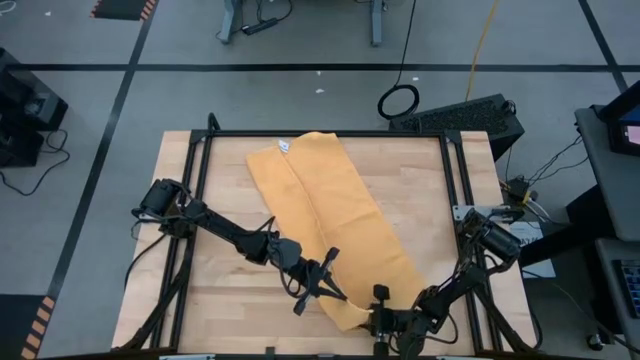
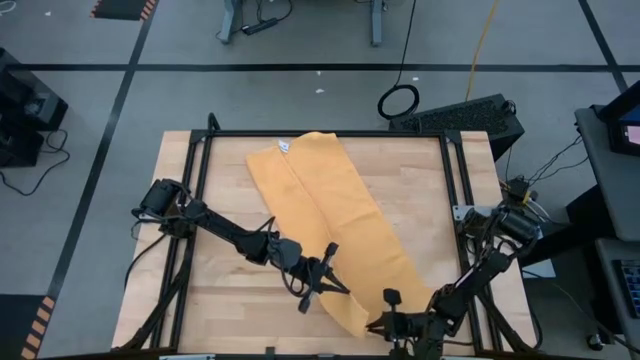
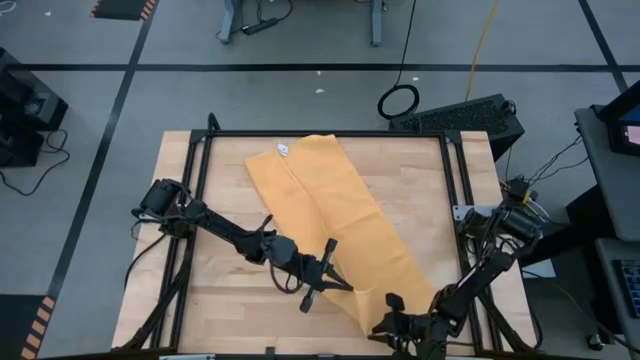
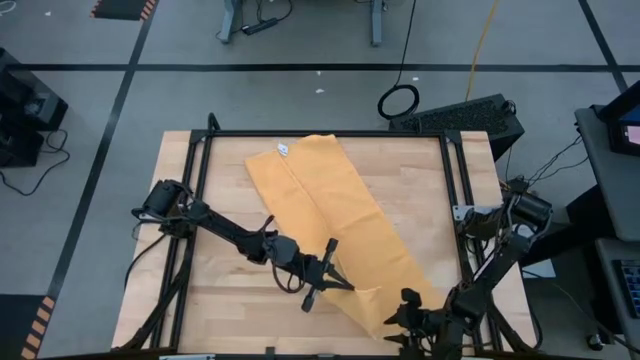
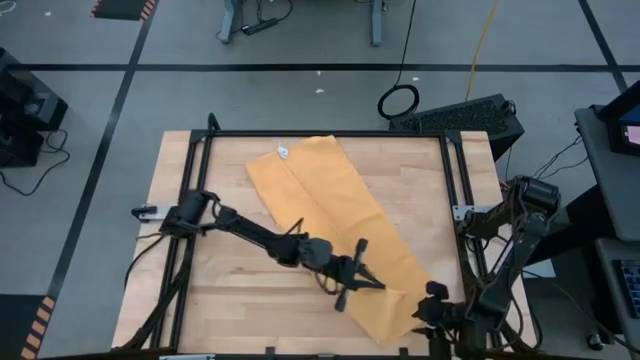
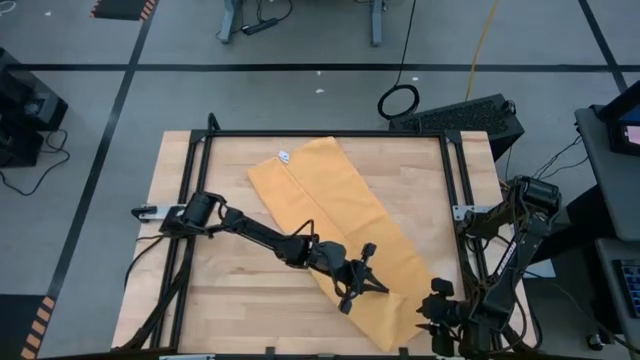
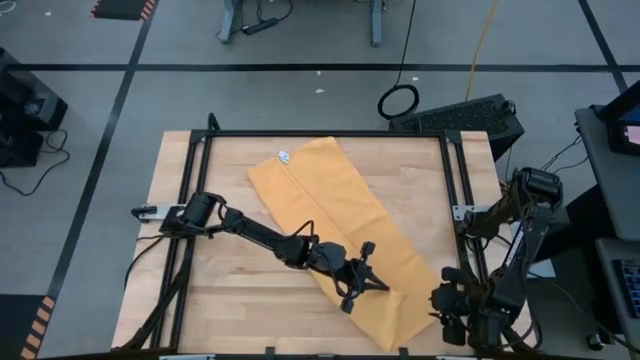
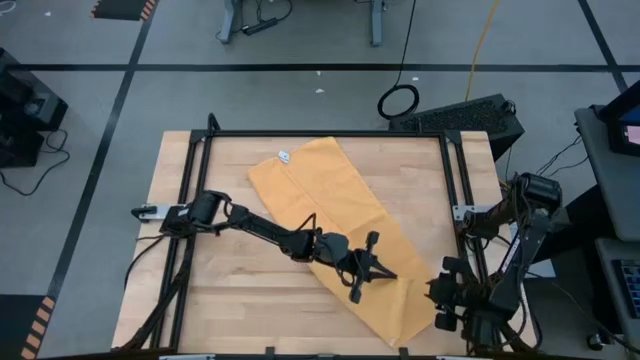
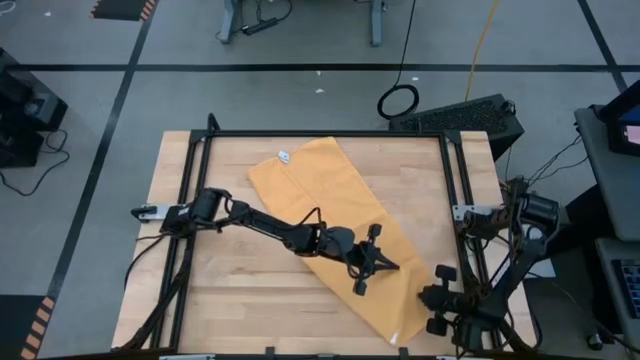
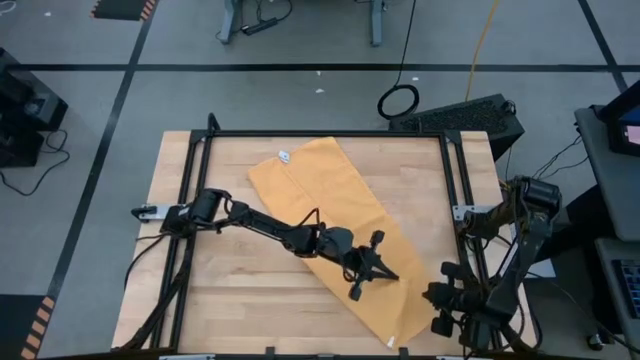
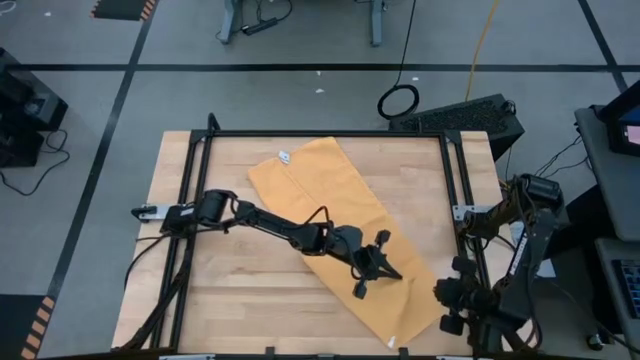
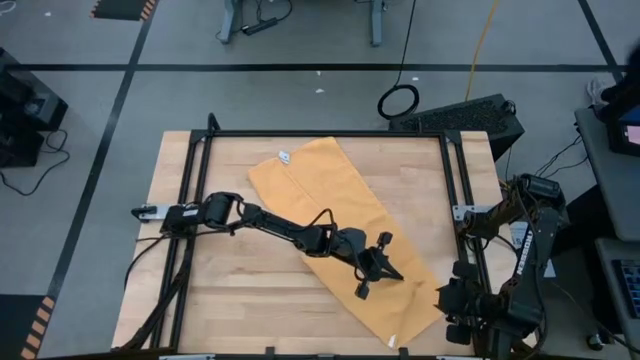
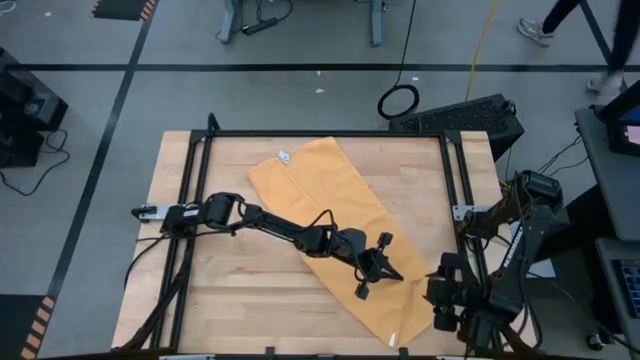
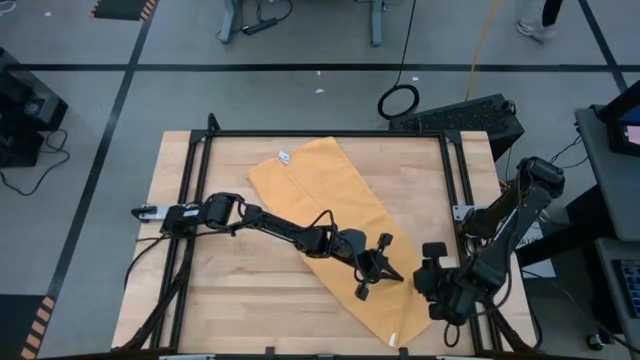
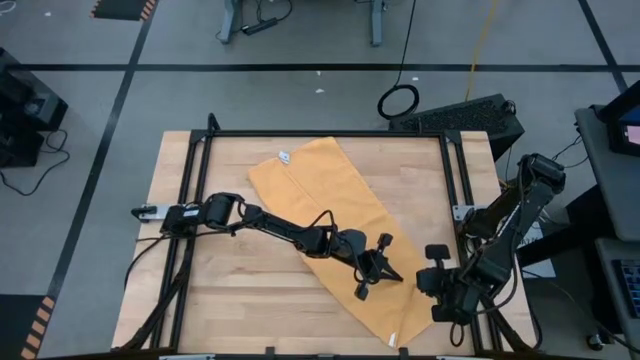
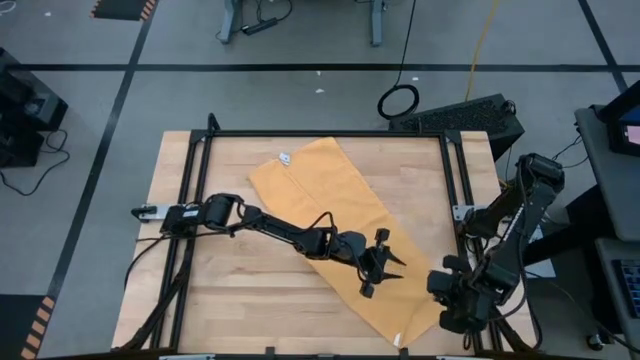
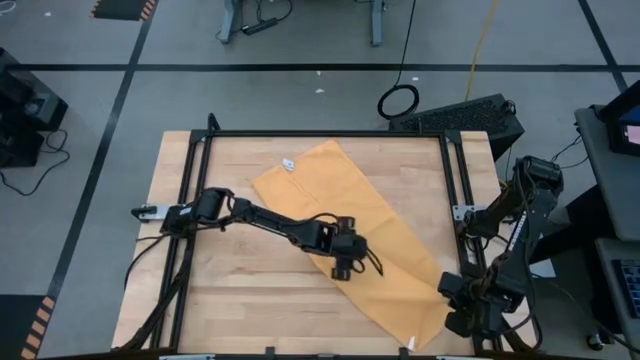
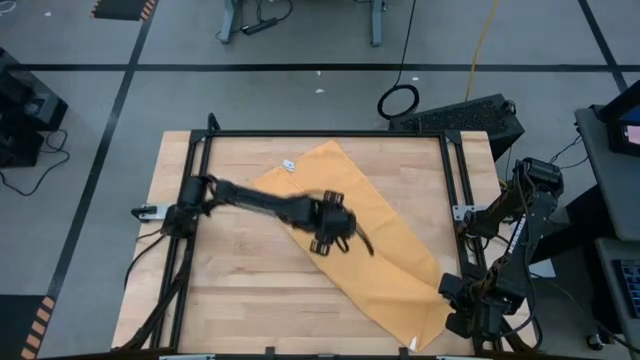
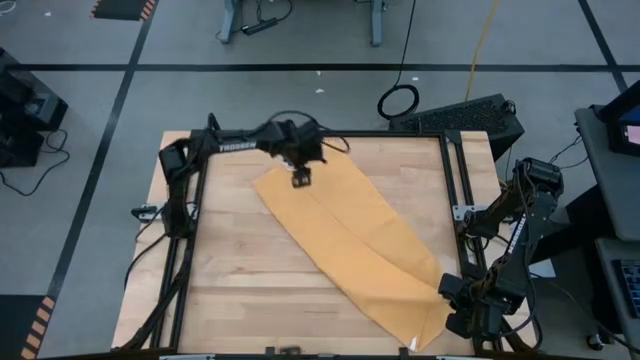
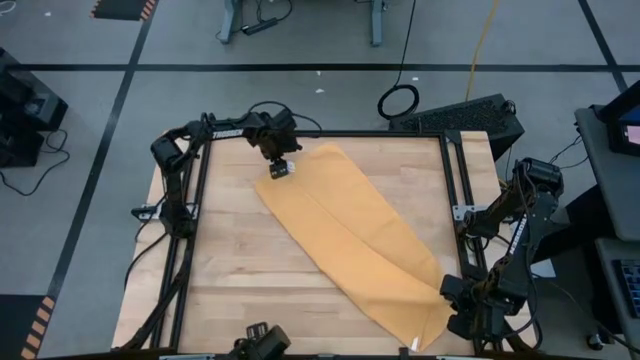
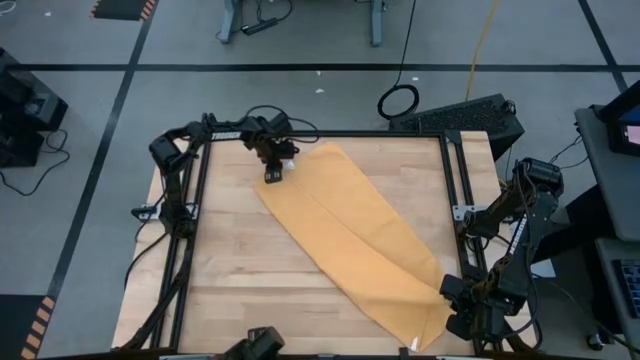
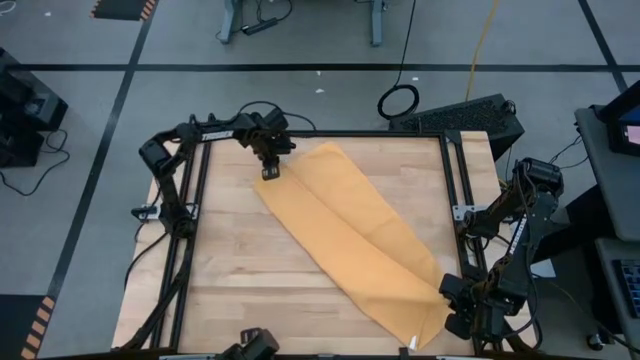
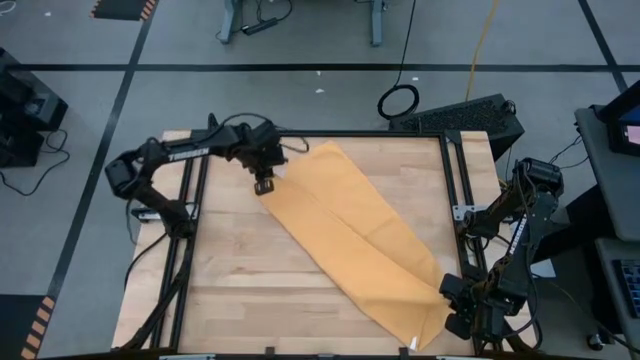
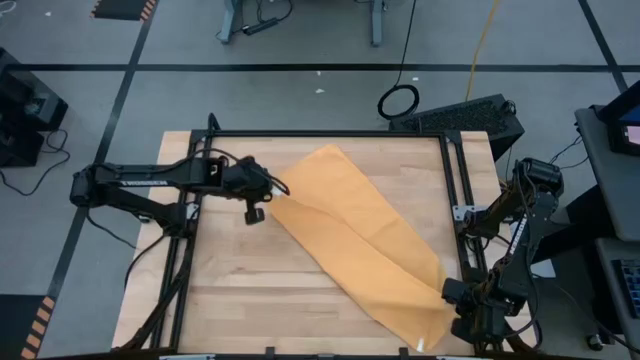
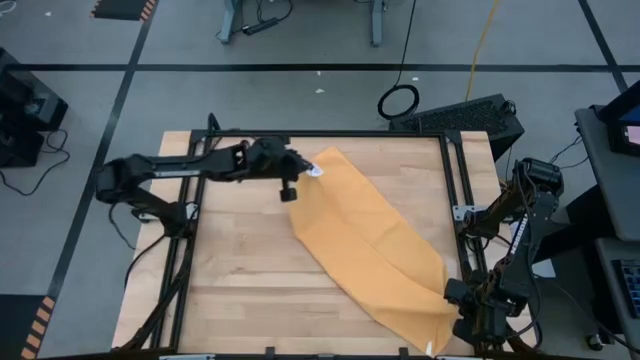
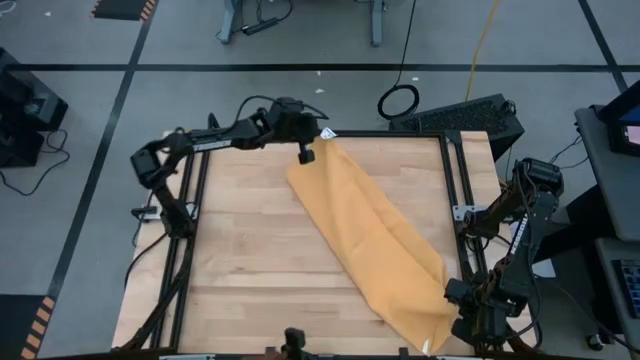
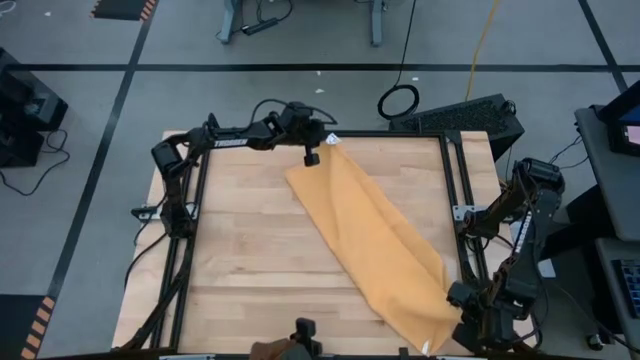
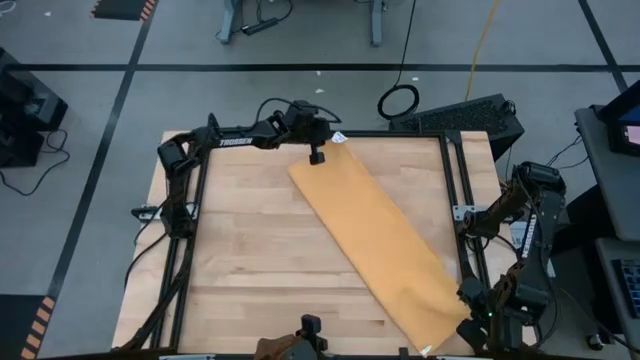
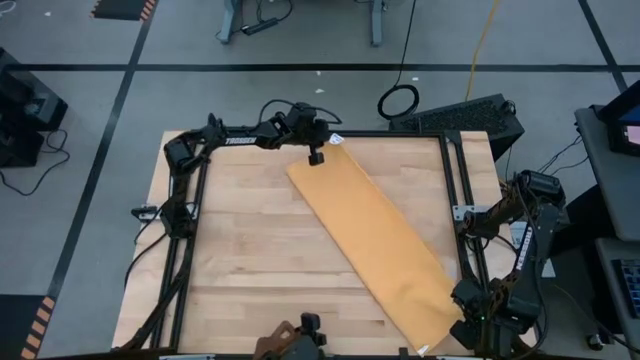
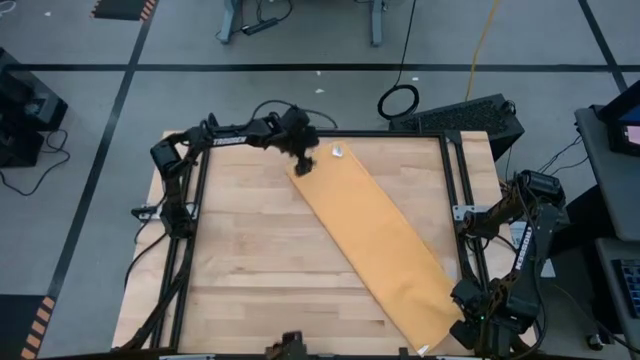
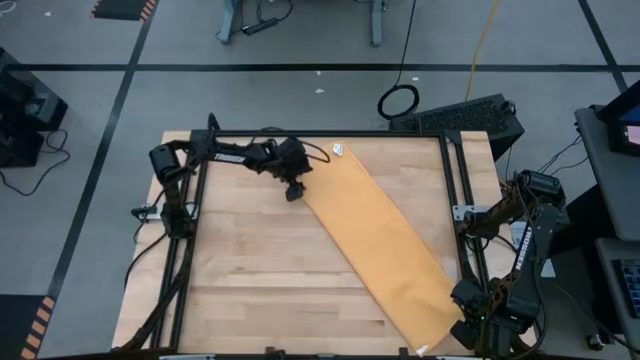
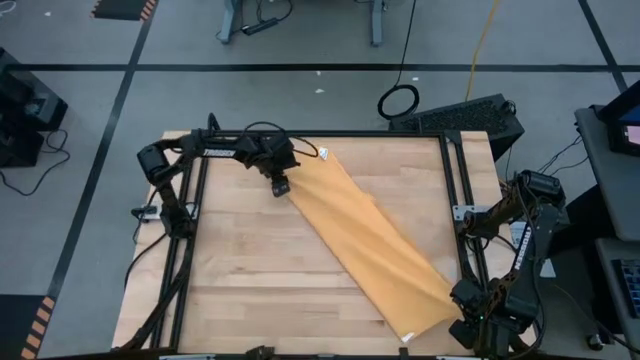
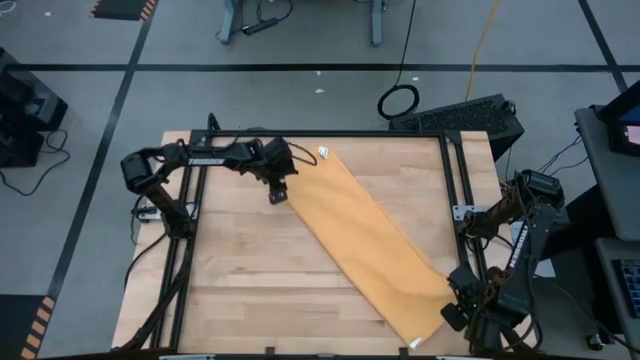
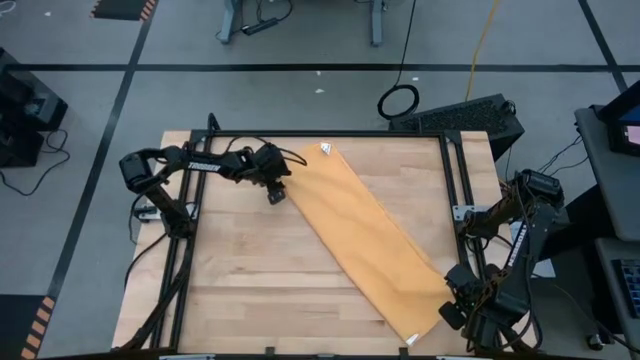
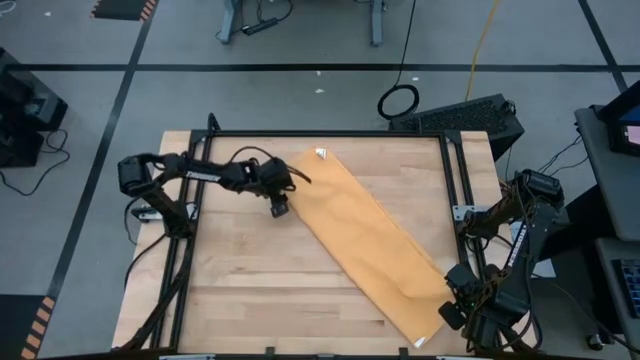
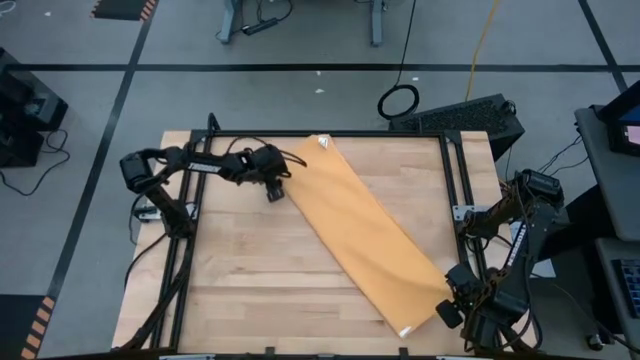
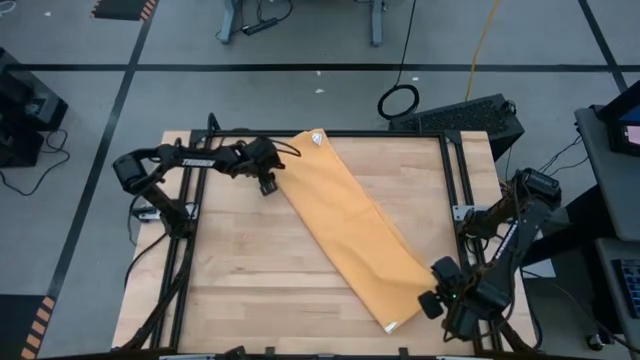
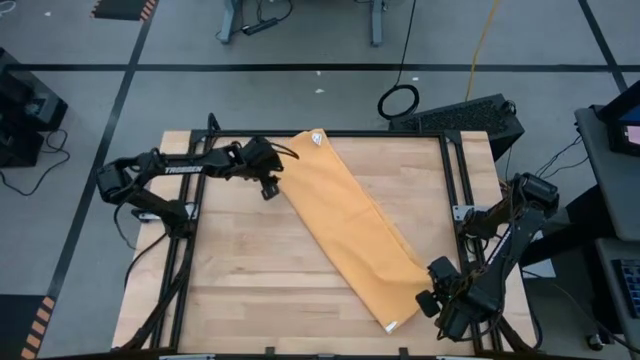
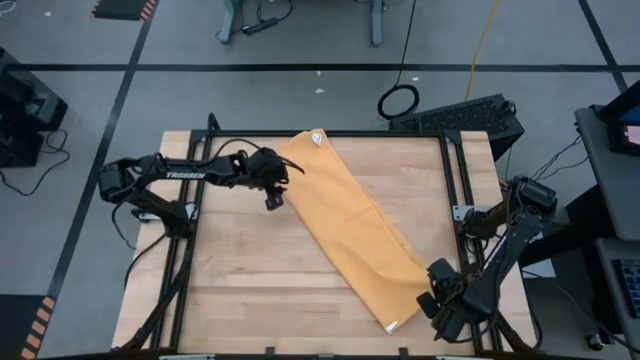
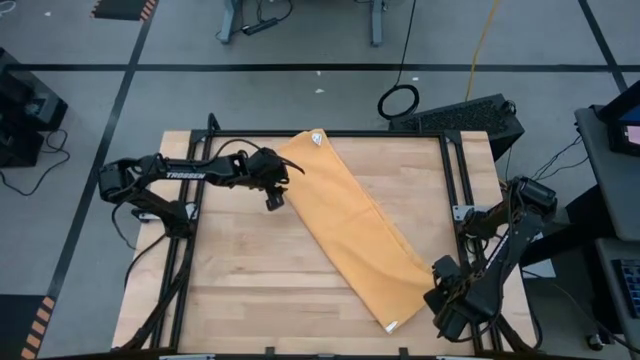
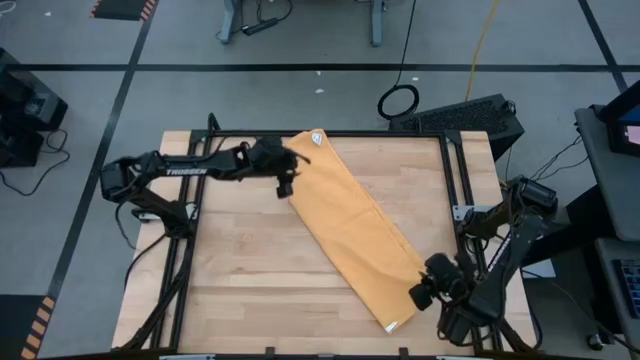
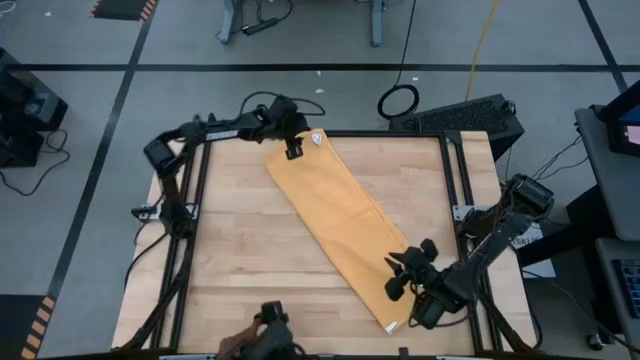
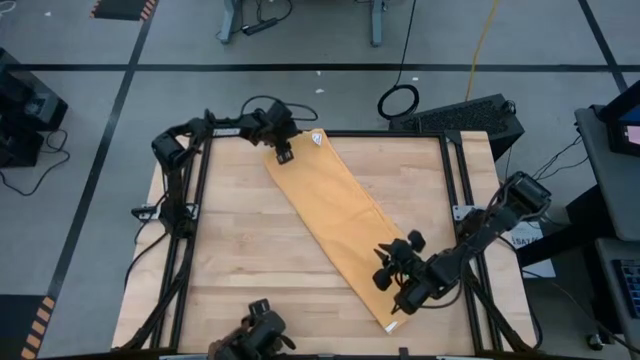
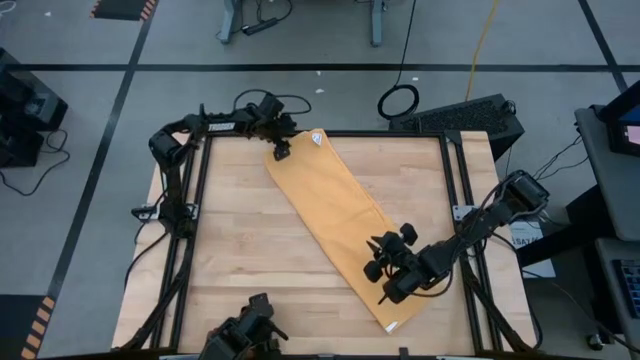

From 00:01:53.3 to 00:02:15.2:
Task: Roll towel
Fold the yellow towel
